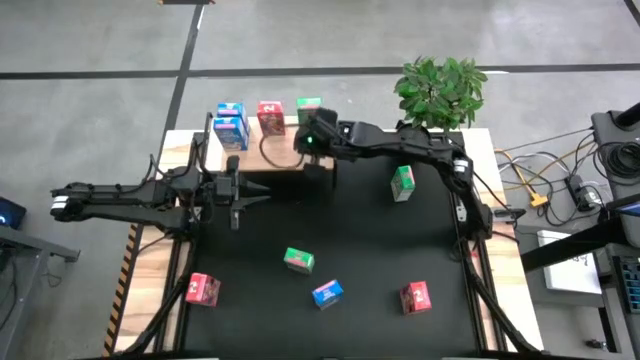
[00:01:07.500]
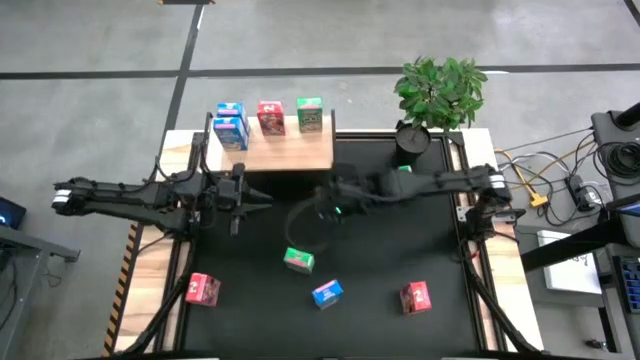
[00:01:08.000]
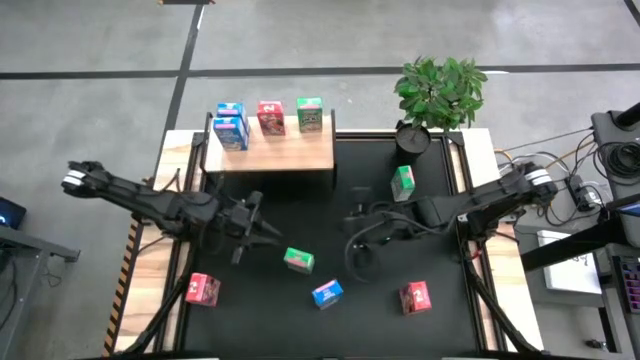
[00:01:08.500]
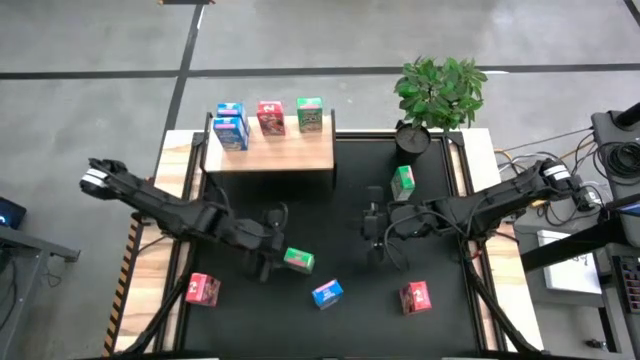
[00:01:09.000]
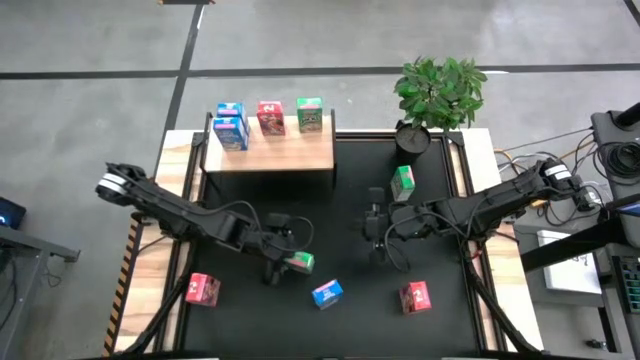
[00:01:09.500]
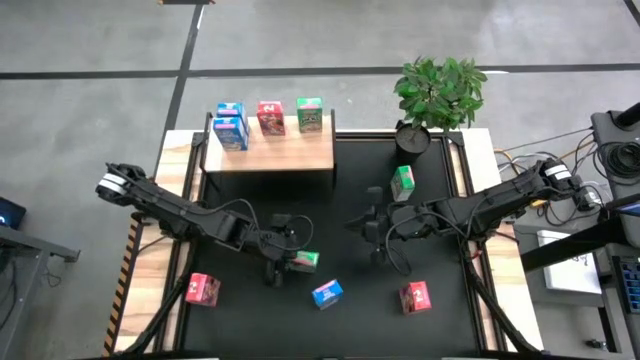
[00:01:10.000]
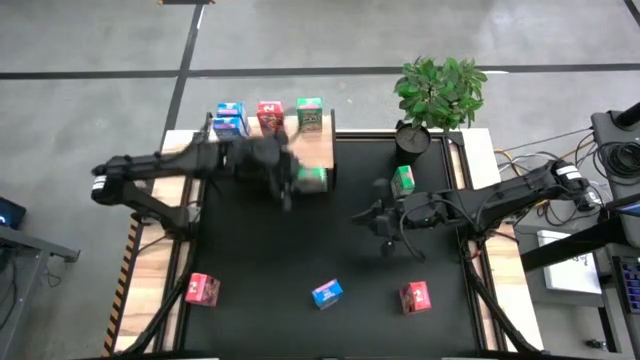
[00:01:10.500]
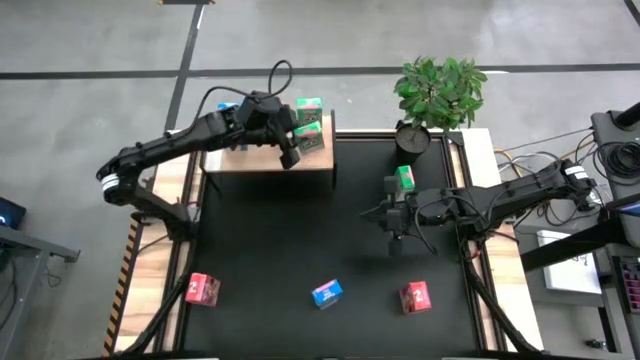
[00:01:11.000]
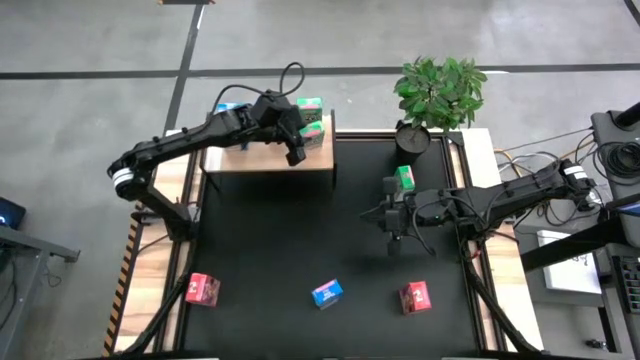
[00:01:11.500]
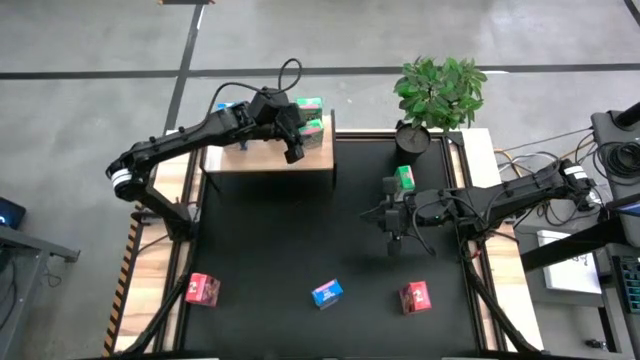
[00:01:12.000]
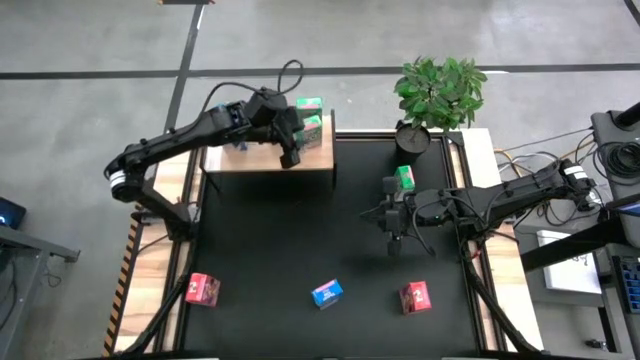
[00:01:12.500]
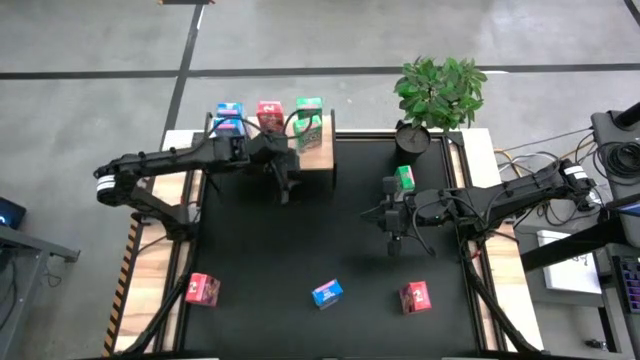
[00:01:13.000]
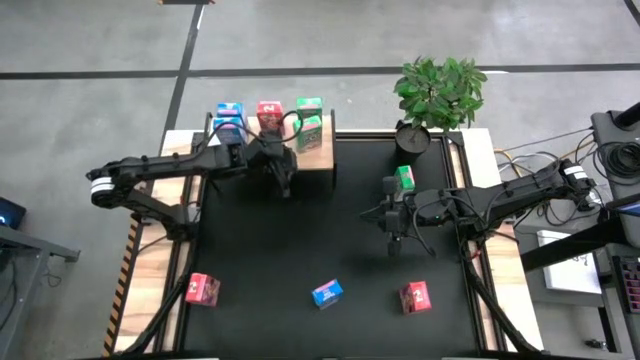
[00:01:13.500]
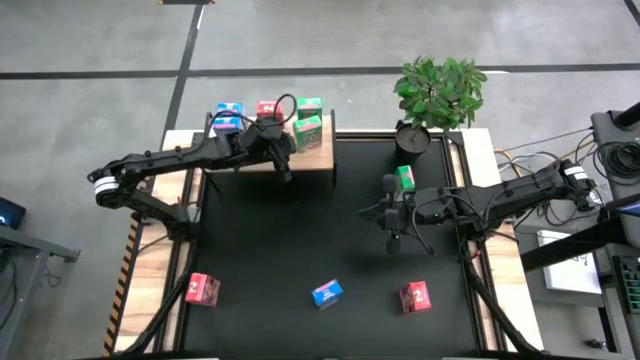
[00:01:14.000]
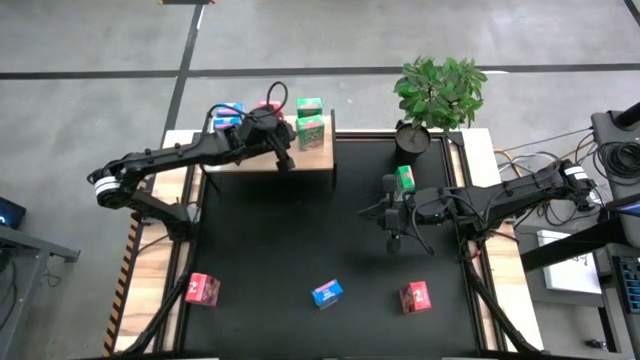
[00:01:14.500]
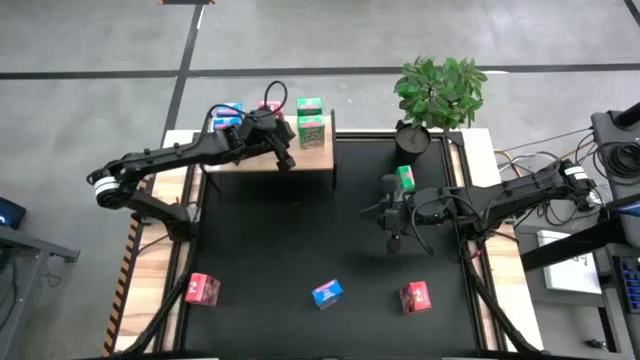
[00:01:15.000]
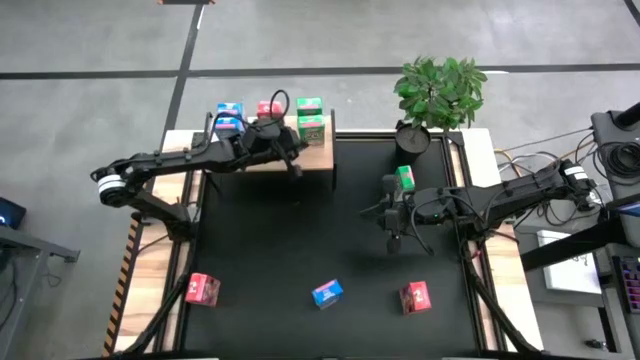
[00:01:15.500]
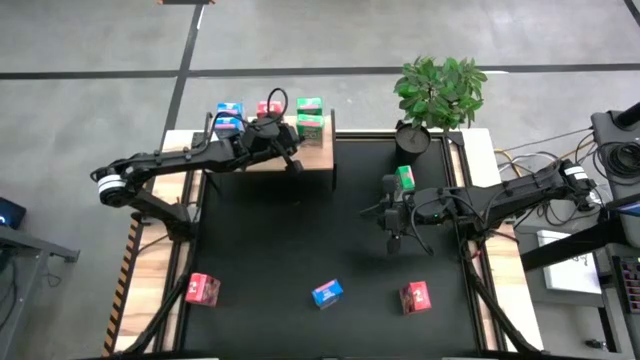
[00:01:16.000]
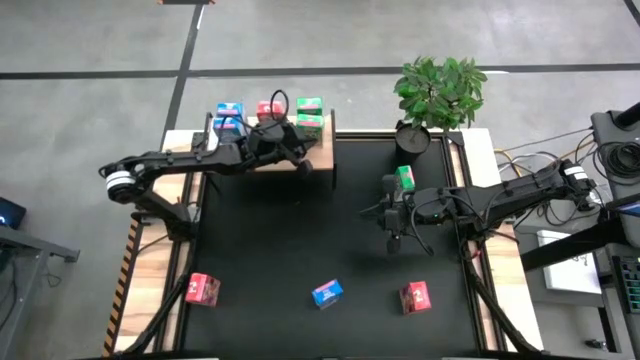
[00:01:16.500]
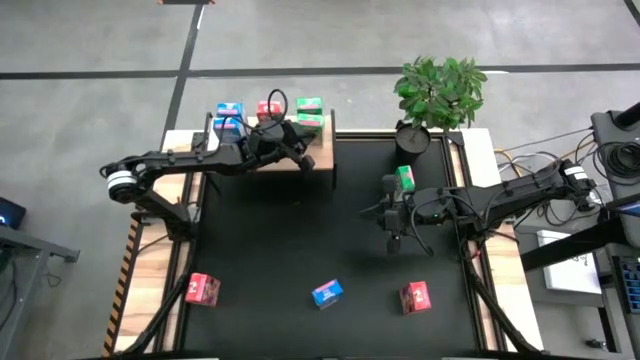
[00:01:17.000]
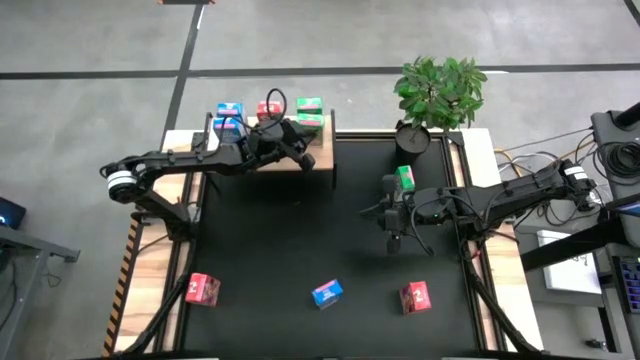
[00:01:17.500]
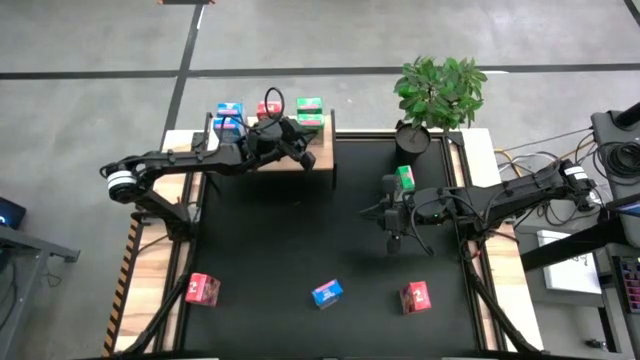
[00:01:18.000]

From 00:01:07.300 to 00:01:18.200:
Task: Stack cereal on shelf
Put the bottom green cereal box on the shelf aligned with the other green cereal box

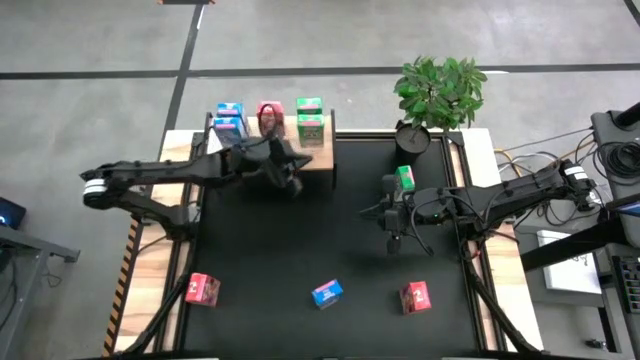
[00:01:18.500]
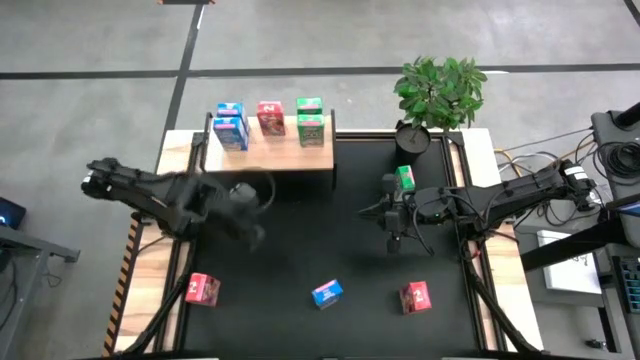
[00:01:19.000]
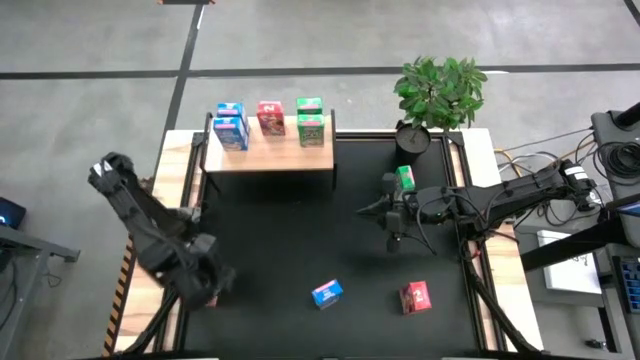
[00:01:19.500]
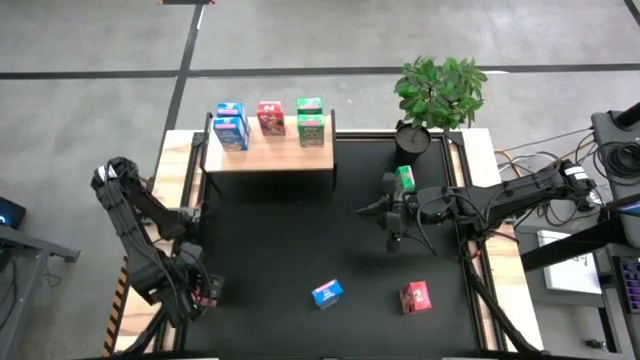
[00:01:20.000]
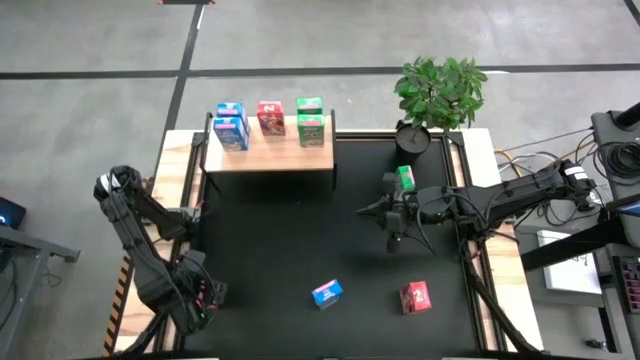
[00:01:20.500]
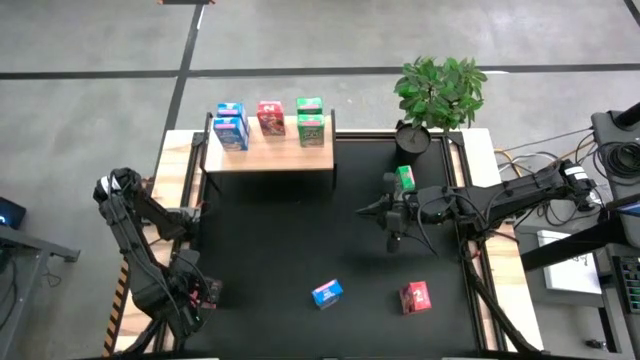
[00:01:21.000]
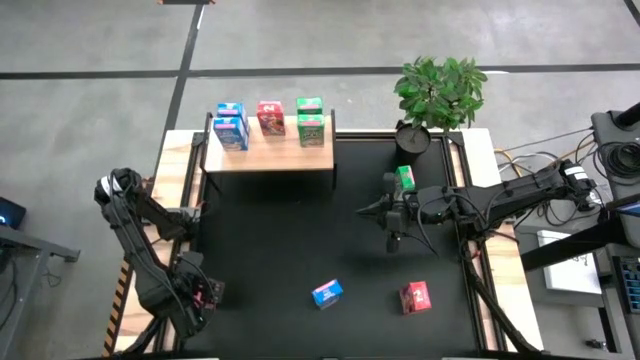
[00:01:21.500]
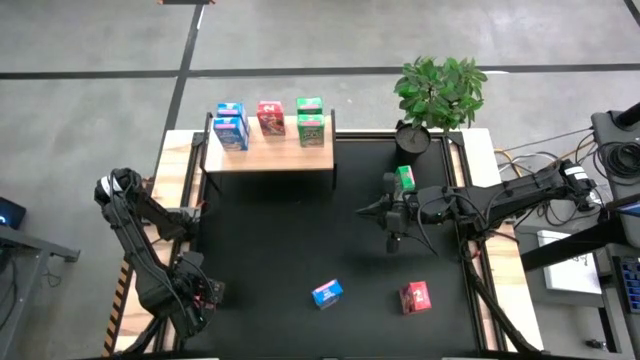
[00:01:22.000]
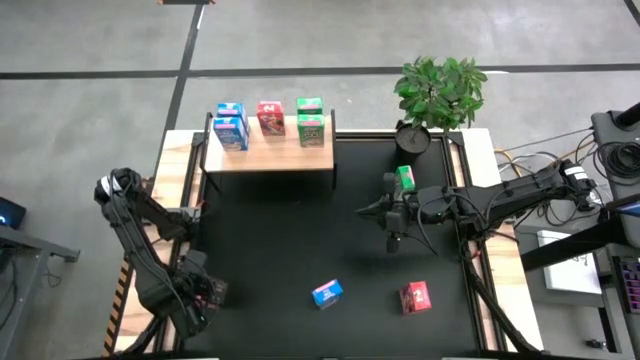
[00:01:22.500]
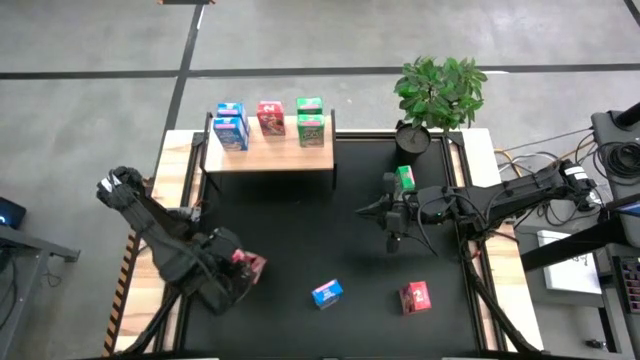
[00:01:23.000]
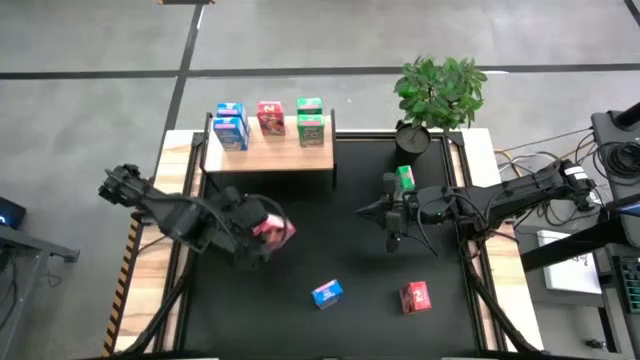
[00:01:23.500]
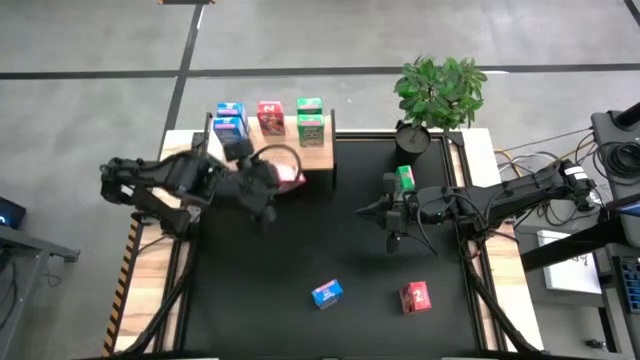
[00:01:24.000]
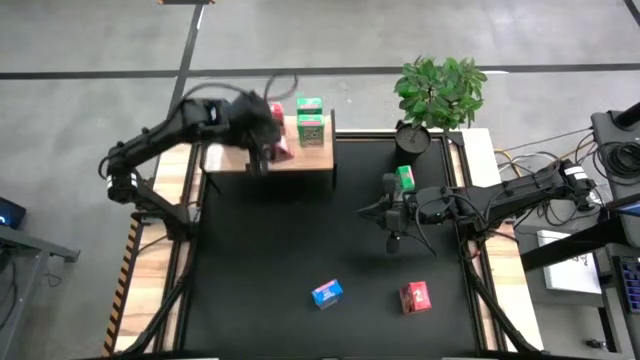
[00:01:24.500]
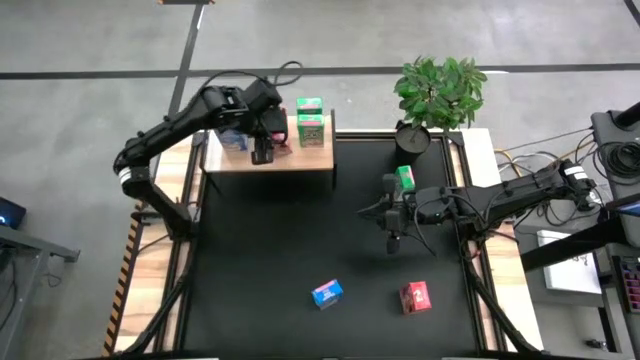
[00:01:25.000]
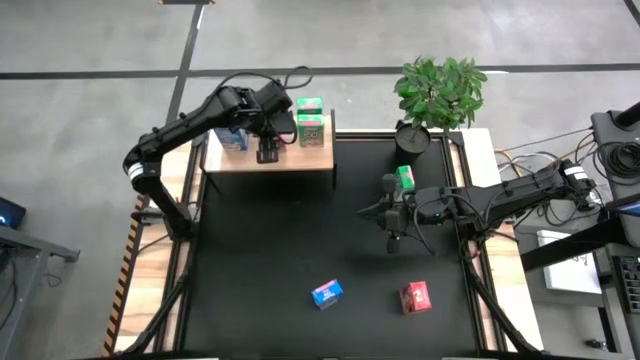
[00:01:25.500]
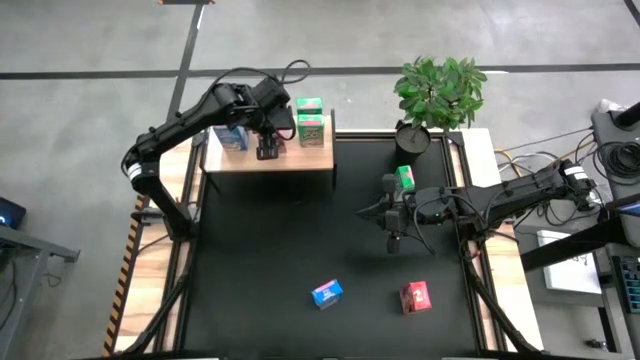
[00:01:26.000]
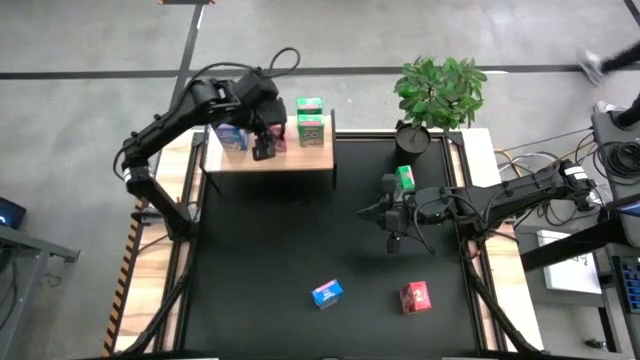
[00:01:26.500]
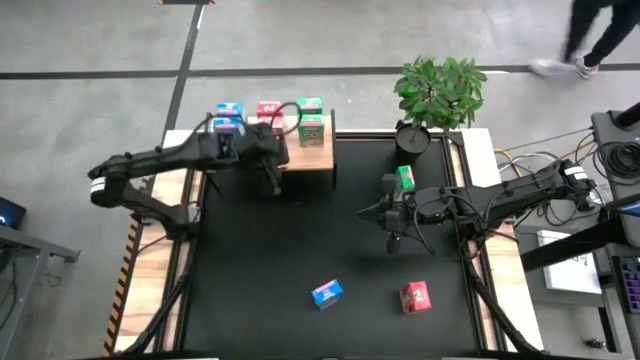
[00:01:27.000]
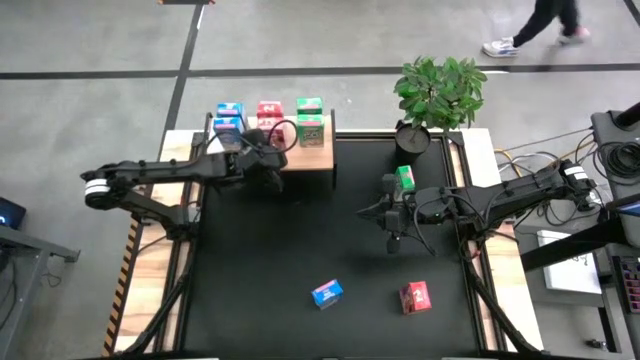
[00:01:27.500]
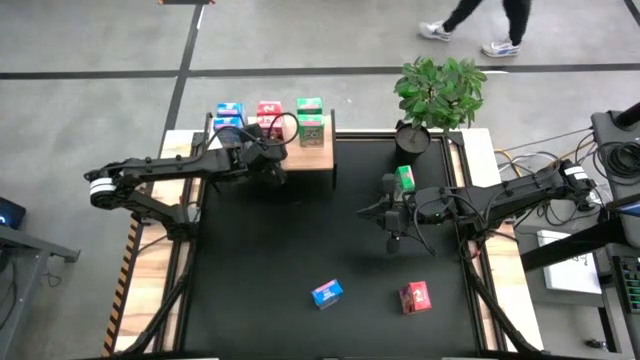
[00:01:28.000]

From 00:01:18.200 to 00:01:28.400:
Put the left red cereal box on the shelf aligned with the other red cereal box
